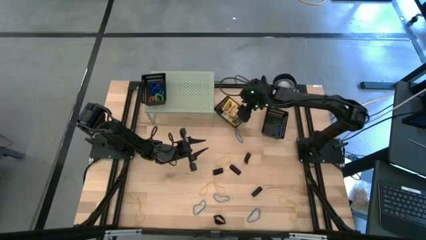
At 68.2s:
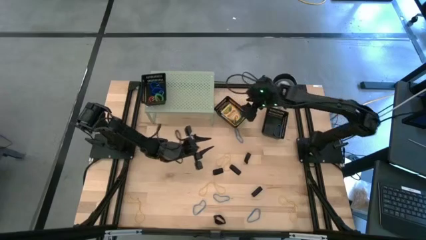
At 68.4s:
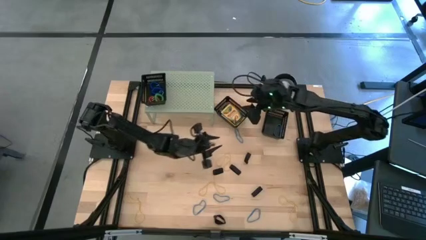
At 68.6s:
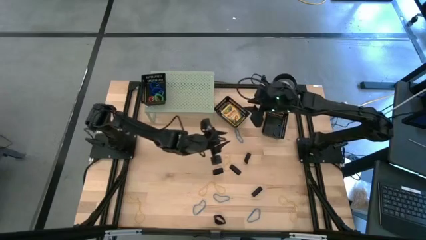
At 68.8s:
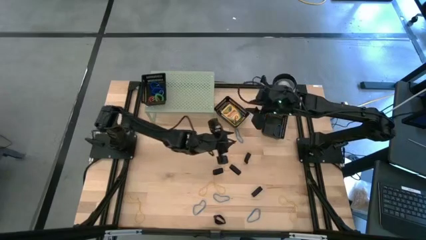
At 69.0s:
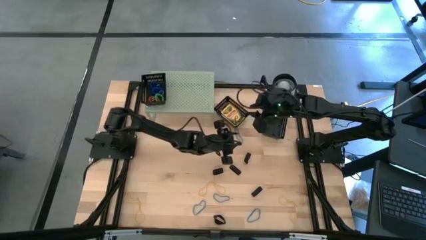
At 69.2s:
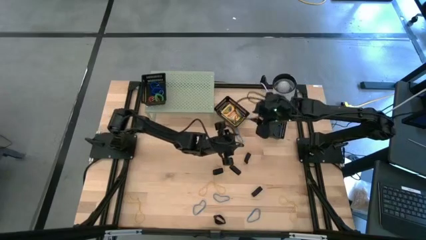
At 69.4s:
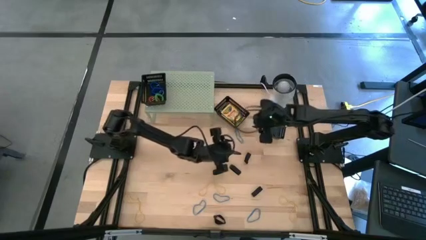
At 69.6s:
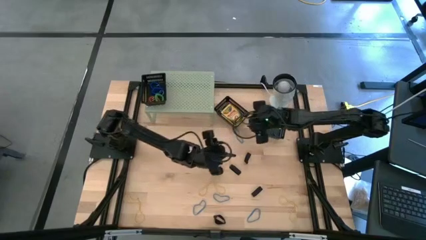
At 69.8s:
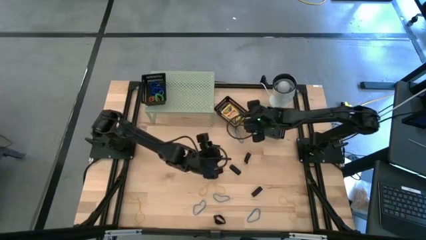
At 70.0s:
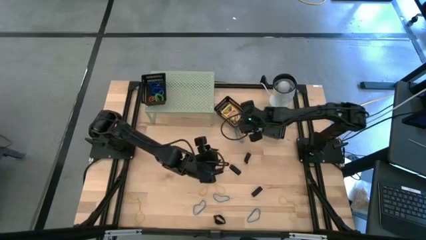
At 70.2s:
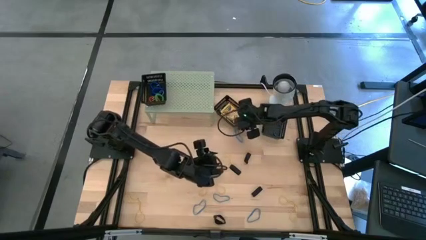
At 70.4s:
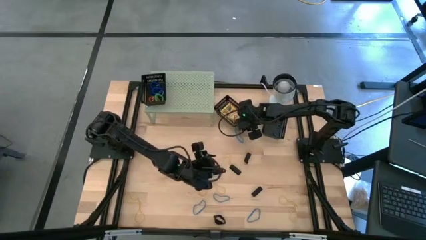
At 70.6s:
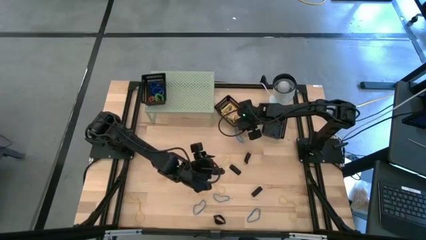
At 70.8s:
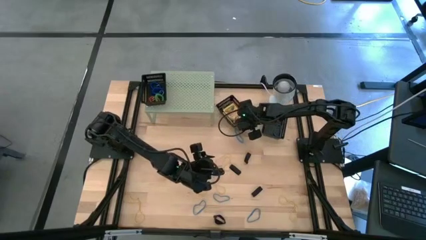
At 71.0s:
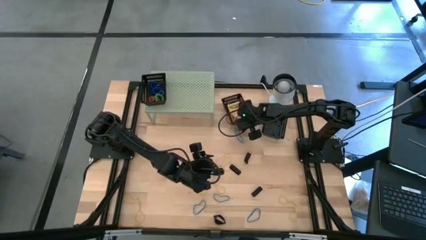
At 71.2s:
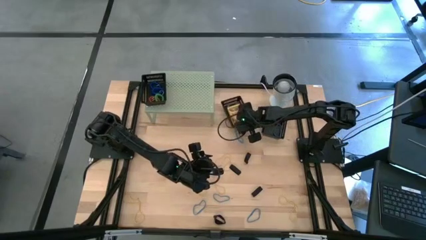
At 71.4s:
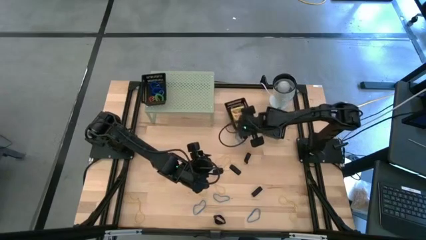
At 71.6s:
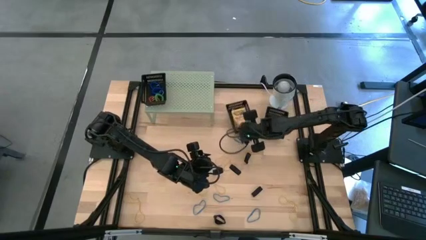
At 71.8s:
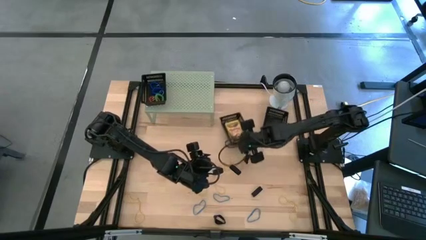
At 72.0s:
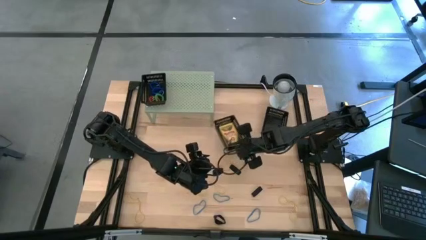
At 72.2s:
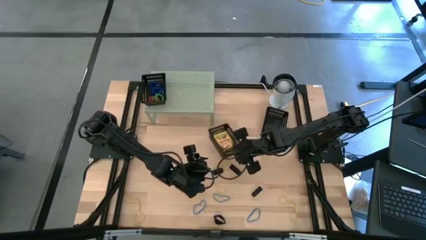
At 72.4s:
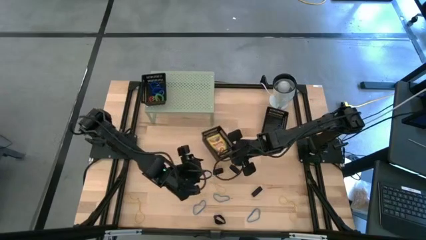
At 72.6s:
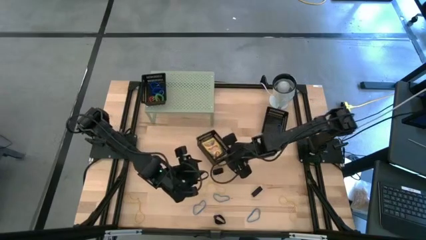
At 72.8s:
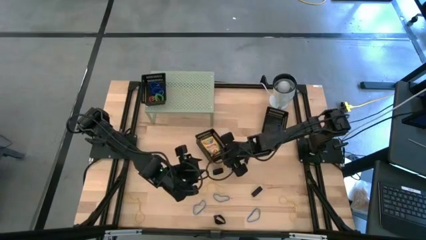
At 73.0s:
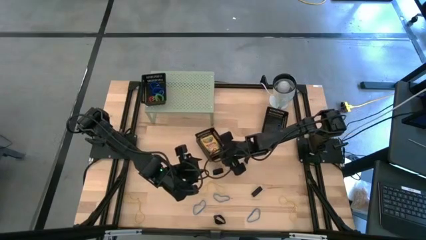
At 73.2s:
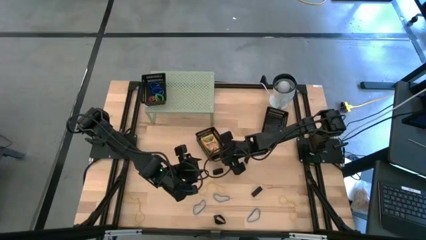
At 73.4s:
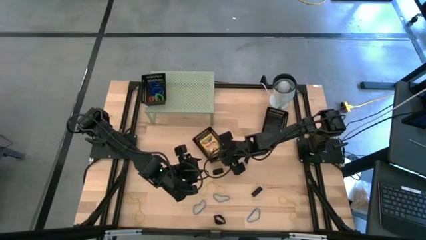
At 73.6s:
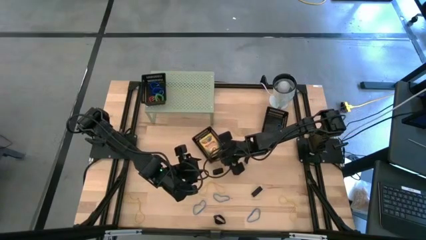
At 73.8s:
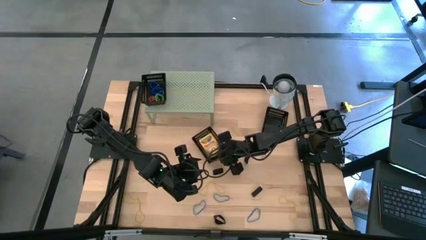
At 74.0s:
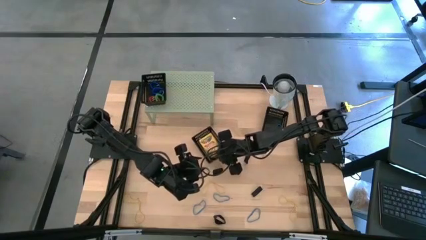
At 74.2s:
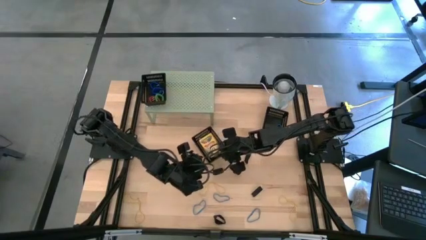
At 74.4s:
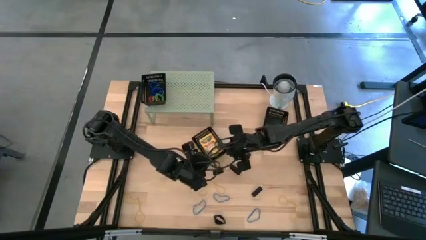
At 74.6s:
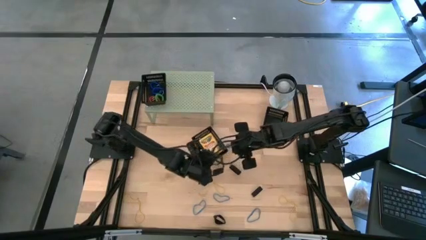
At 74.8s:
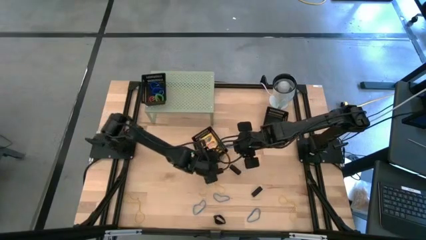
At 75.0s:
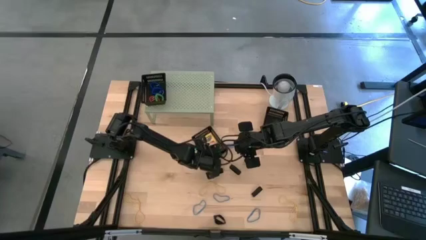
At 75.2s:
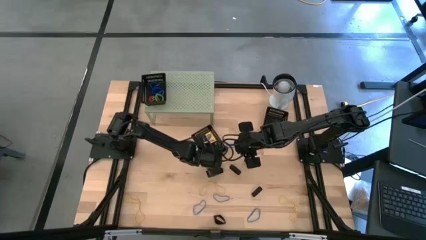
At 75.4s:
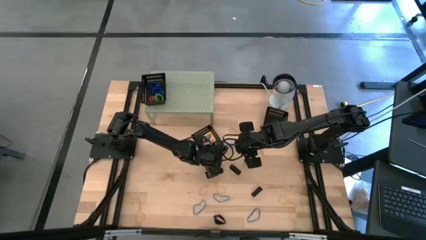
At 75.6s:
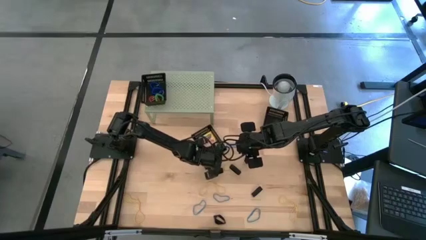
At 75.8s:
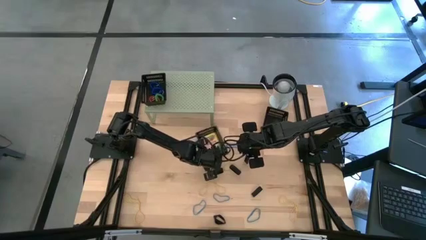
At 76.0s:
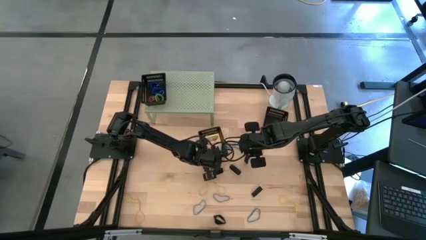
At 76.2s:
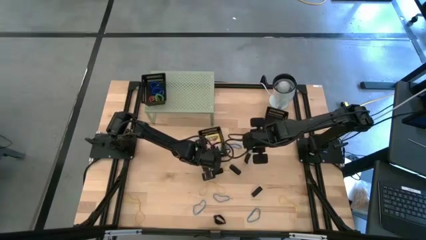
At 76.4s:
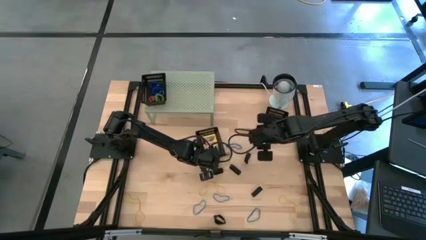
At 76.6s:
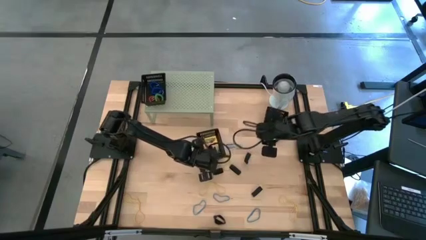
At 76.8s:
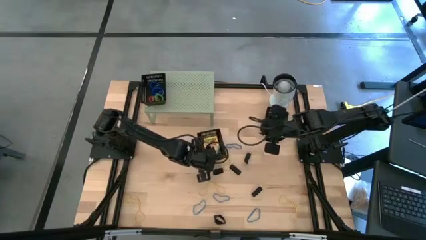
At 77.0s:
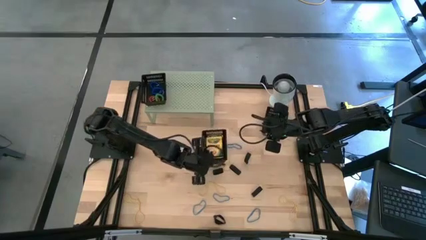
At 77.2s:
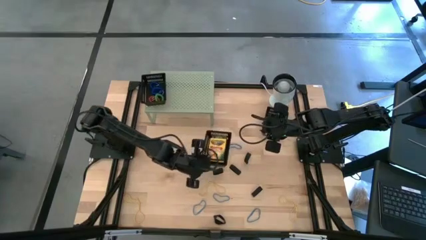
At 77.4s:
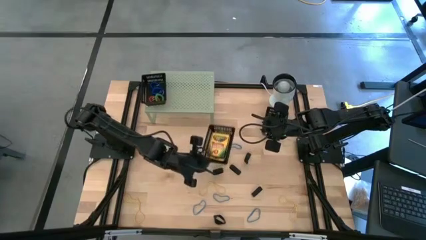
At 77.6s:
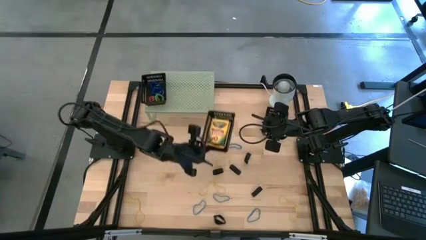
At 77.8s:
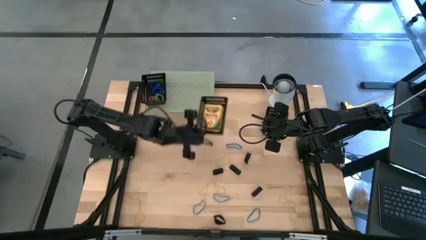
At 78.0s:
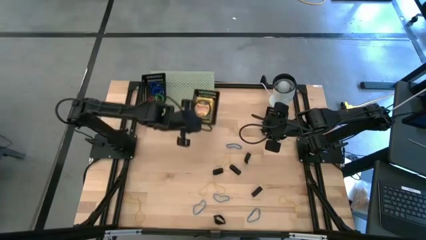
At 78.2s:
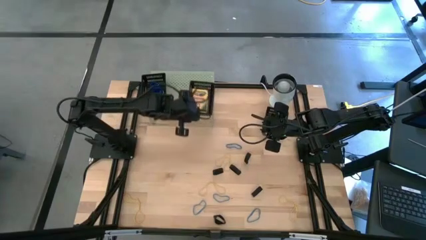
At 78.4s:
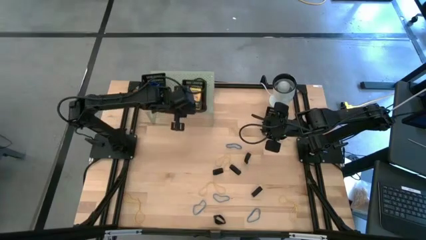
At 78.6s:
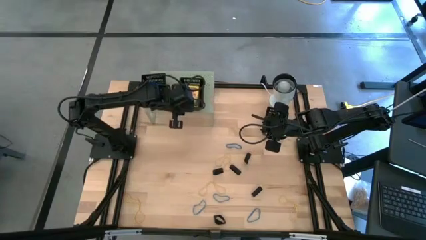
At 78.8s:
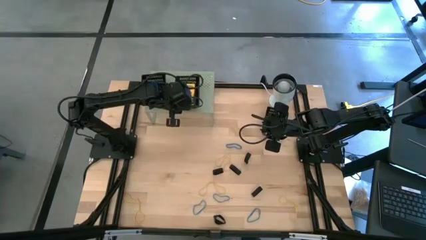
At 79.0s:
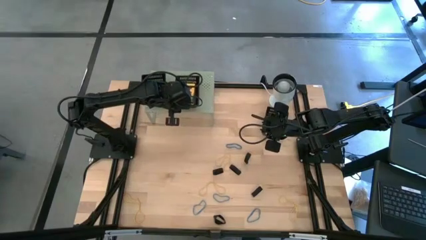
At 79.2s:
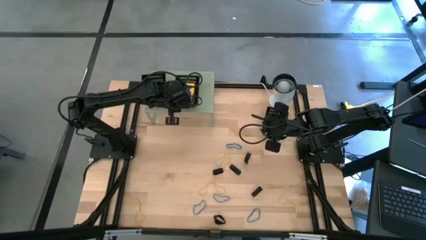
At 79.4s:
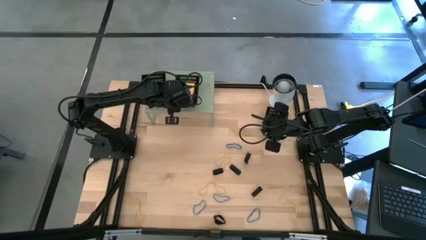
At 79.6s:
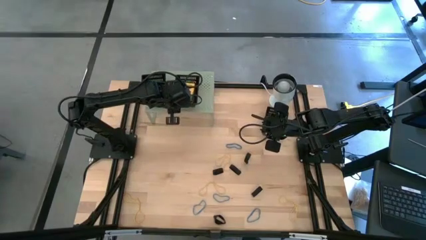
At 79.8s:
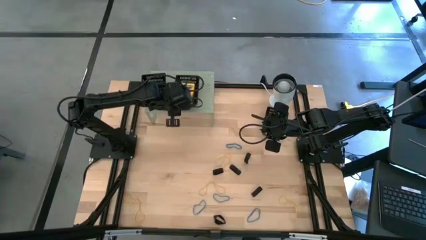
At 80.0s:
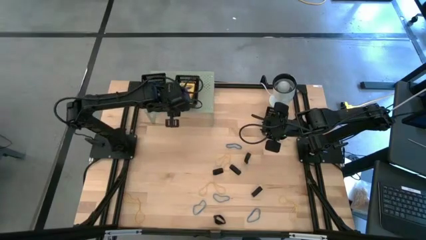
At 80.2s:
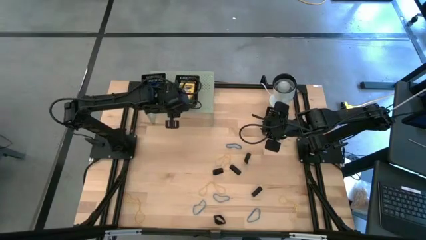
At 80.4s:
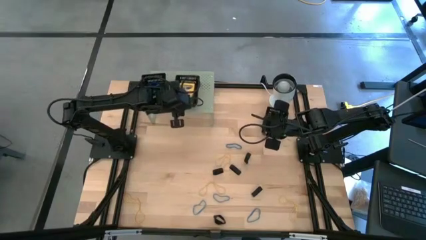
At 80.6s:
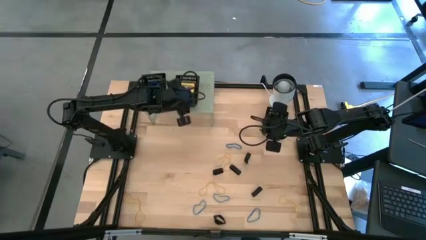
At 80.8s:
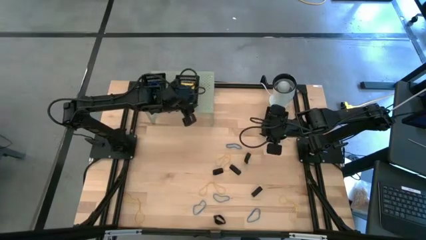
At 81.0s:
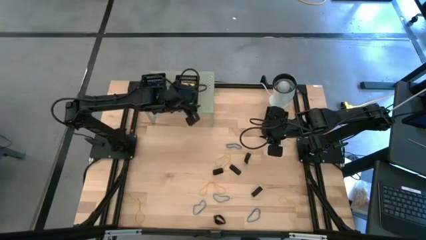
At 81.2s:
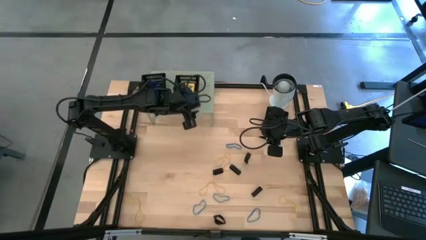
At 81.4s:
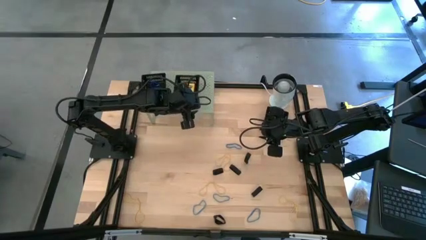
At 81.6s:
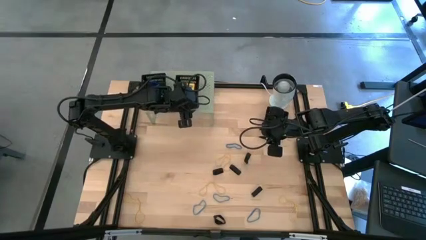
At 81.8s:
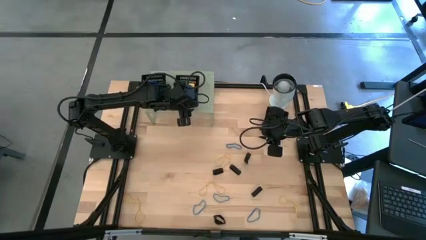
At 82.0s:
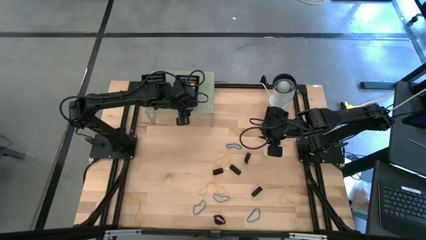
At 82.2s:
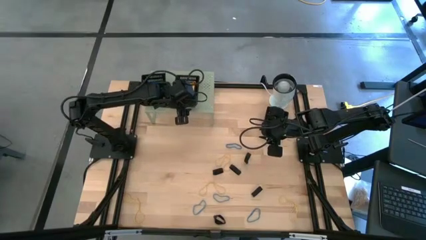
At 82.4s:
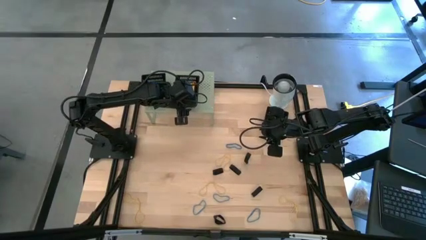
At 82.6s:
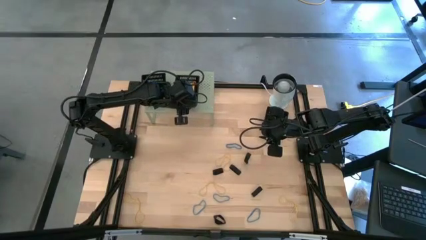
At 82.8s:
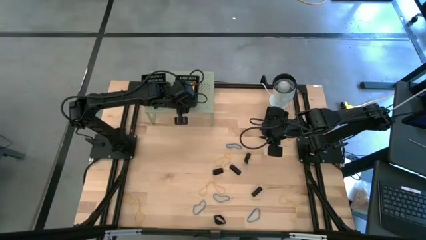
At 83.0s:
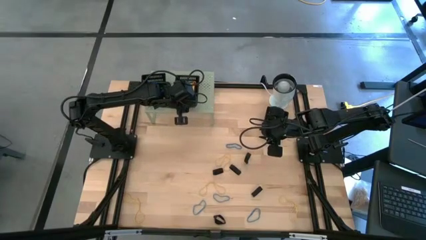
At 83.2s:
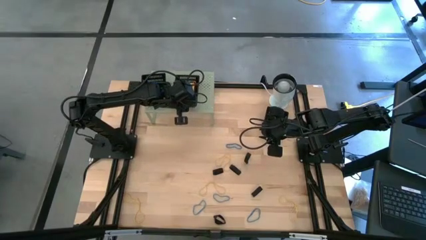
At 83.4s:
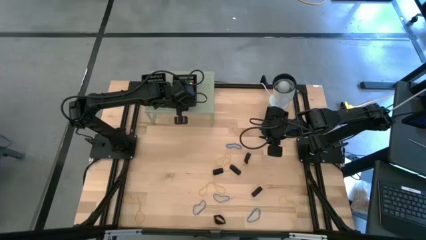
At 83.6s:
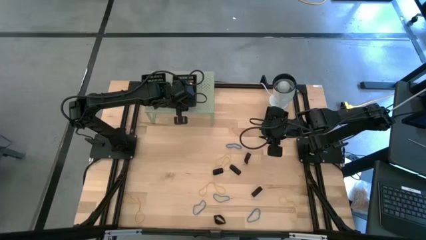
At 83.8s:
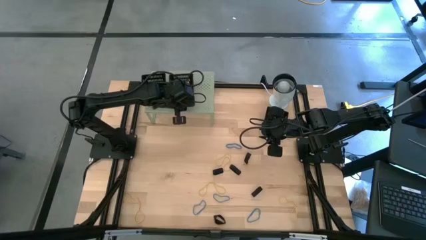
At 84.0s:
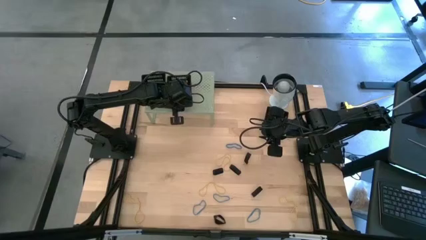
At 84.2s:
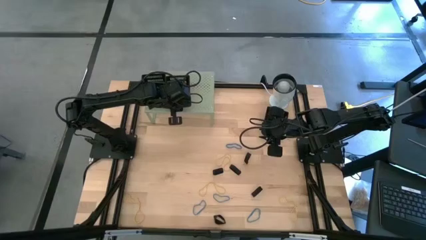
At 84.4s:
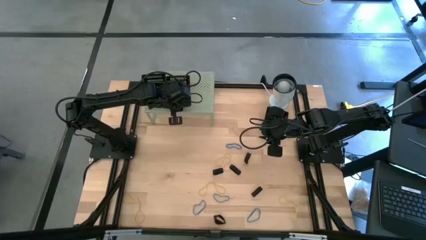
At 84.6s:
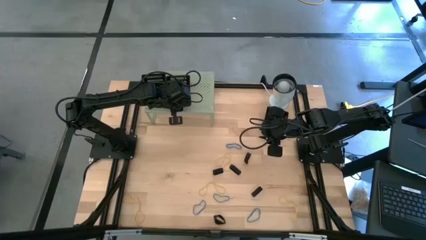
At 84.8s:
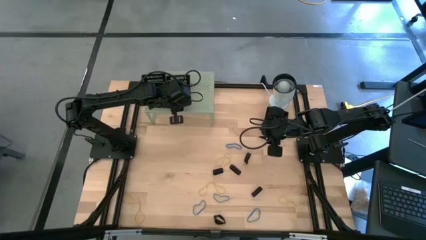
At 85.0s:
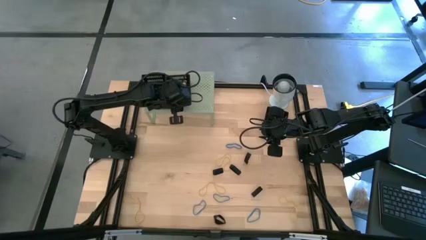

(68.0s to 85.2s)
Task: Pick & Place Office Desk Supplies
Put the left black bin on the shelf
